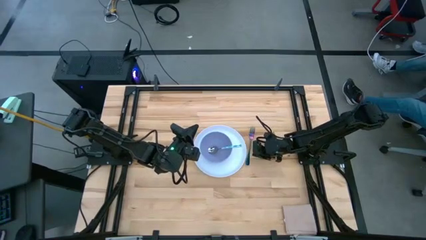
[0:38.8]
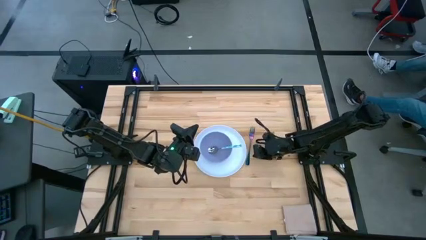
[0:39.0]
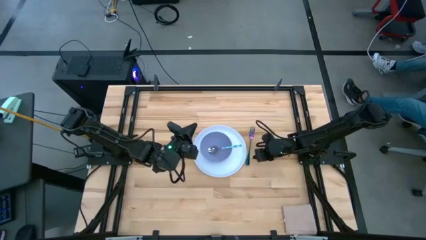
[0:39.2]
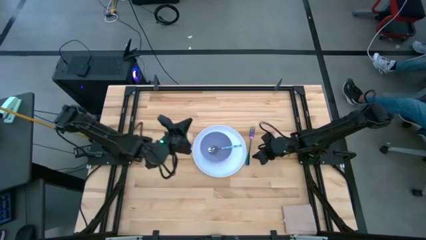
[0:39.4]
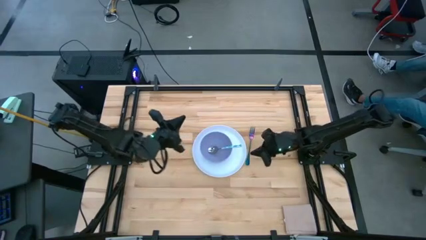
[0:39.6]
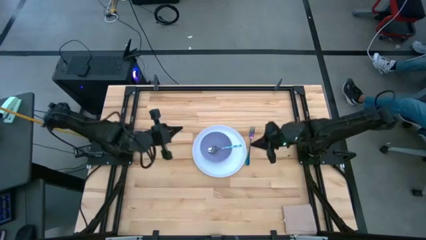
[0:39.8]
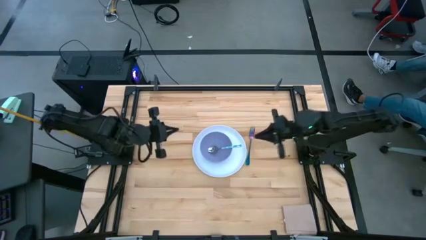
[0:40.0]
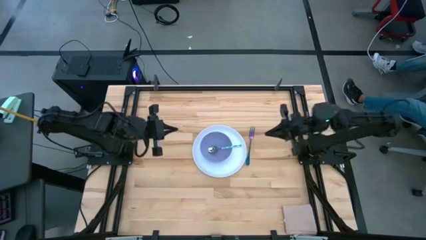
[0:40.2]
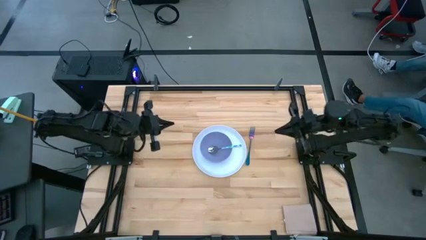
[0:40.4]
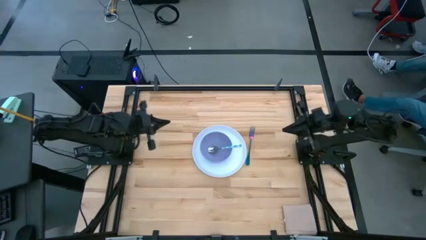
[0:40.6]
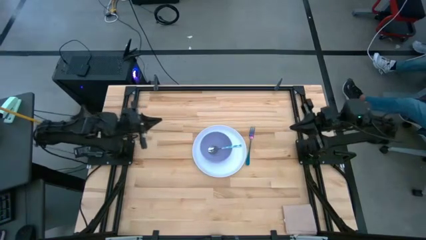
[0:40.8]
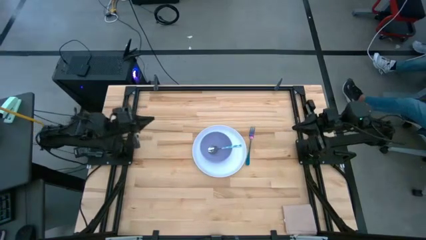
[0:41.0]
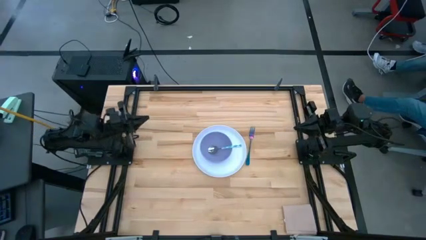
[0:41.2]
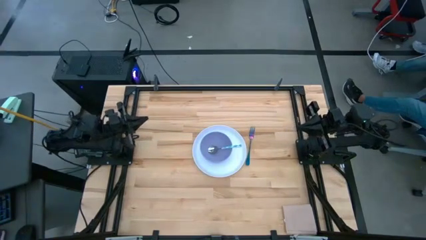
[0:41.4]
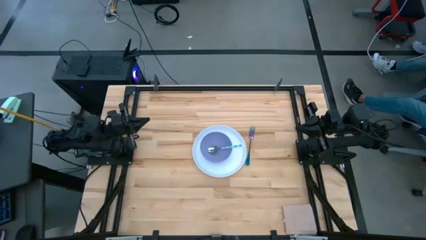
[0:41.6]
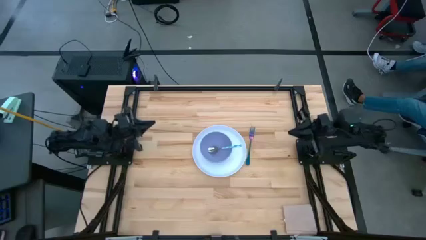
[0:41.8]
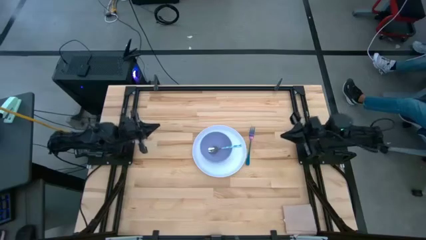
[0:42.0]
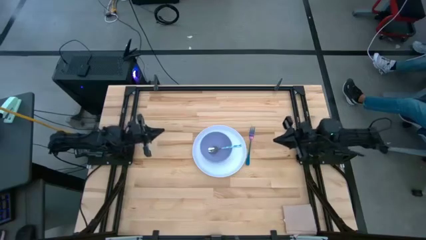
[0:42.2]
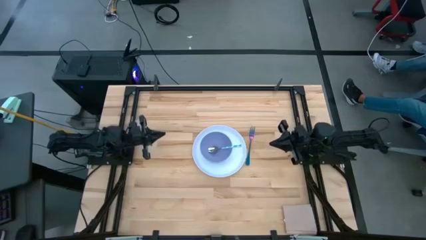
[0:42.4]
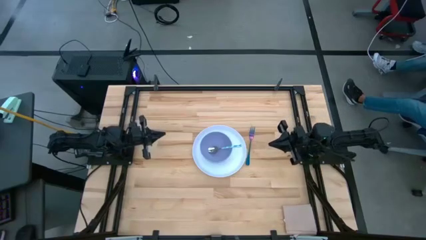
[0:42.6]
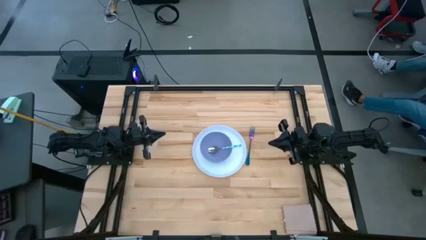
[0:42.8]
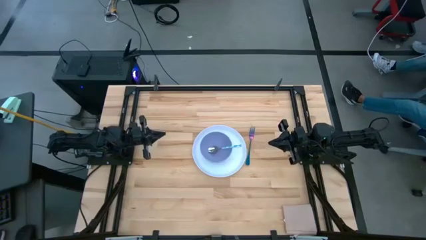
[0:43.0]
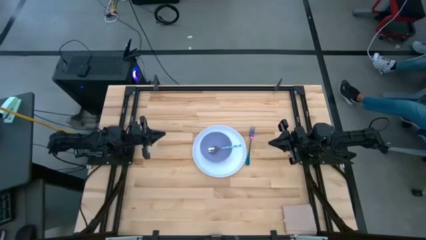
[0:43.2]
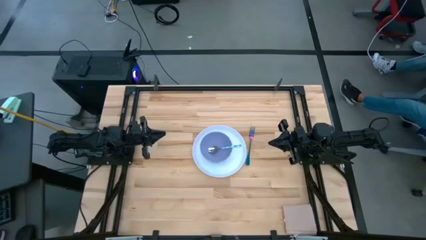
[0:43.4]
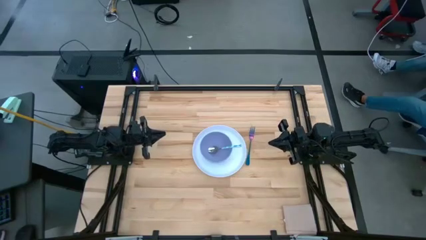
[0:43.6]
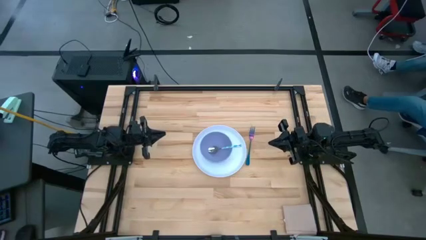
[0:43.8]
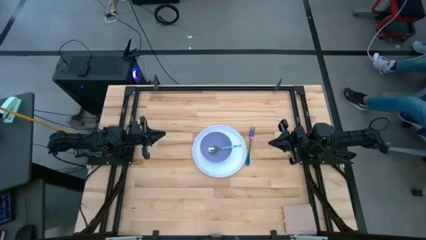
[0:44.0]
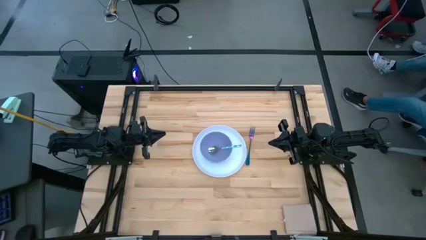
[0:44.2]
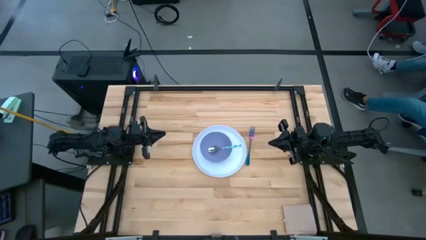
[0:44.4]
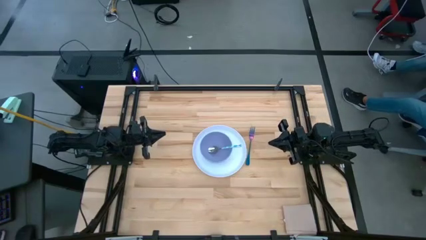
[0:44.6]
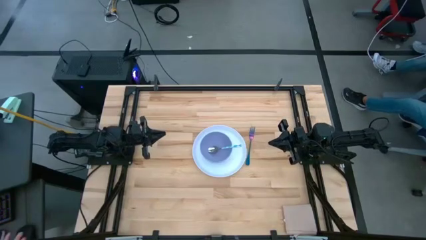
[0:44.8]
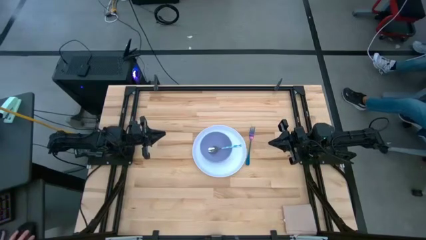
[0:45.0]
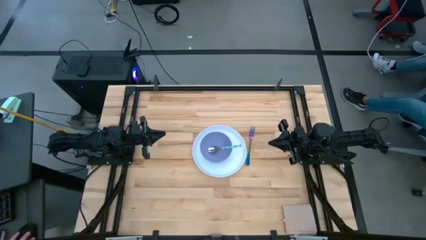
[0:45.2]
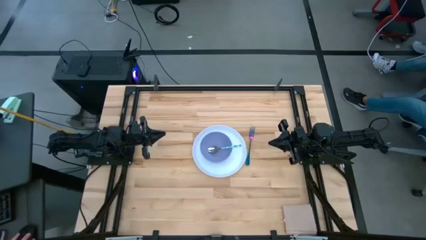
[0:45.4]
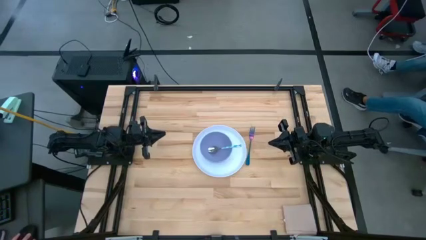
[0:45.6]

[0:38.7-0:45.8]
Task: Set table place
Return to Home Position

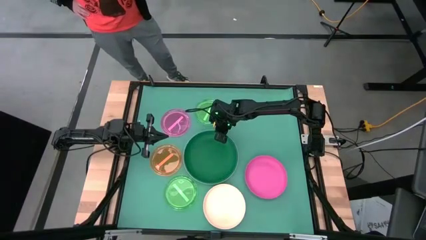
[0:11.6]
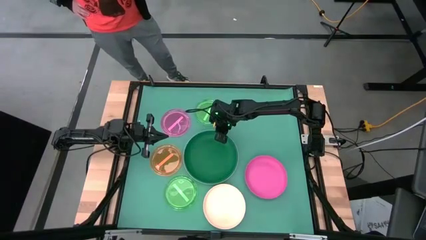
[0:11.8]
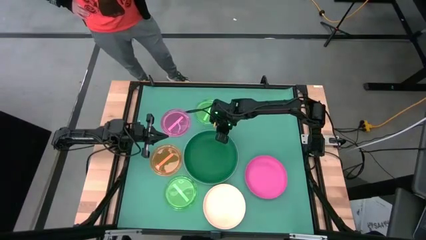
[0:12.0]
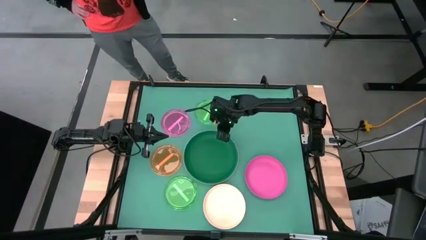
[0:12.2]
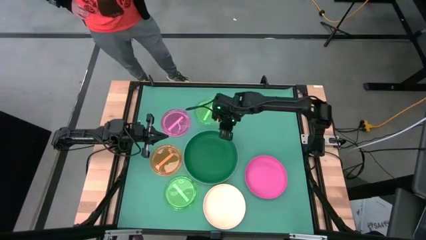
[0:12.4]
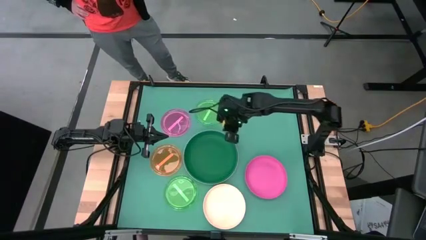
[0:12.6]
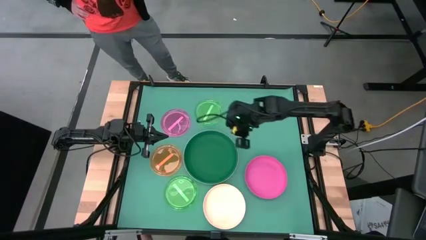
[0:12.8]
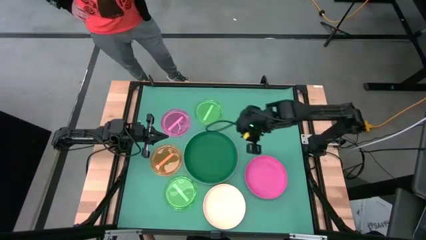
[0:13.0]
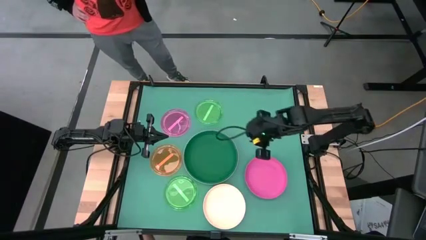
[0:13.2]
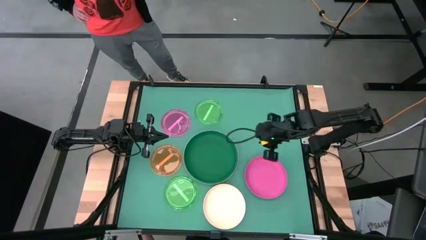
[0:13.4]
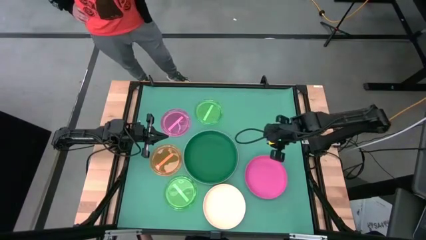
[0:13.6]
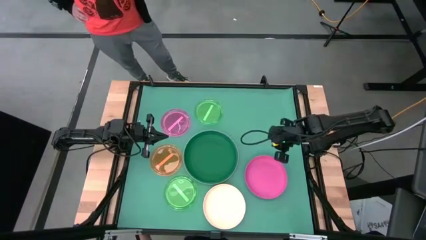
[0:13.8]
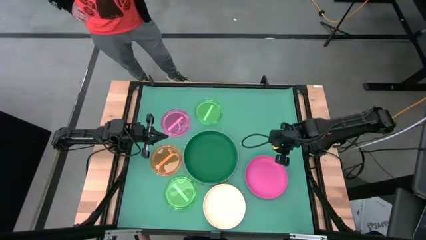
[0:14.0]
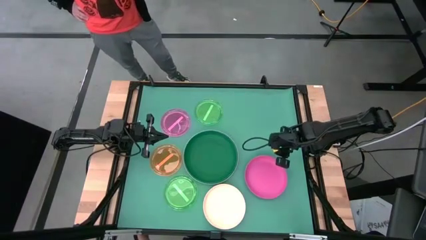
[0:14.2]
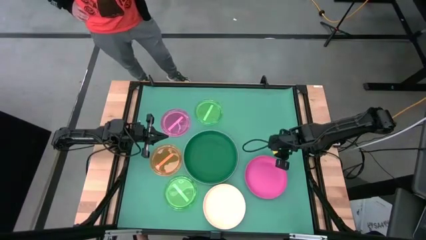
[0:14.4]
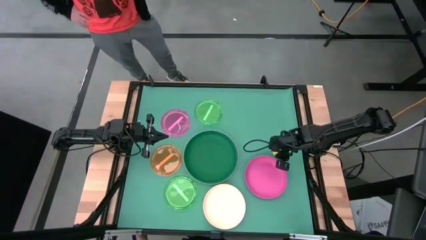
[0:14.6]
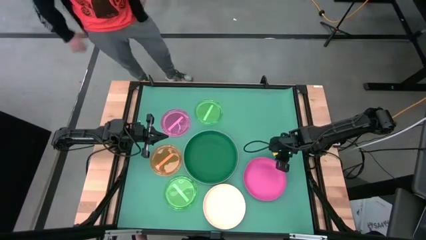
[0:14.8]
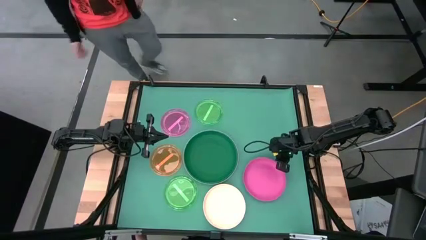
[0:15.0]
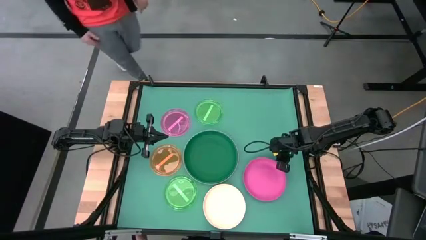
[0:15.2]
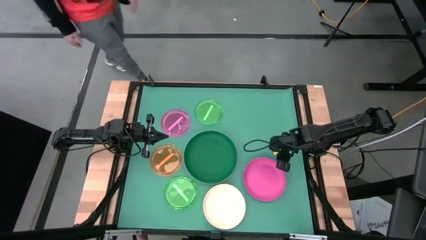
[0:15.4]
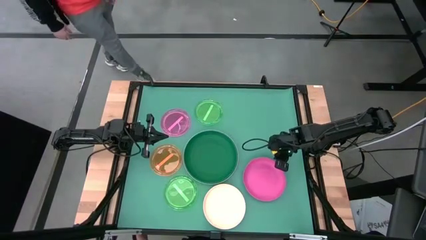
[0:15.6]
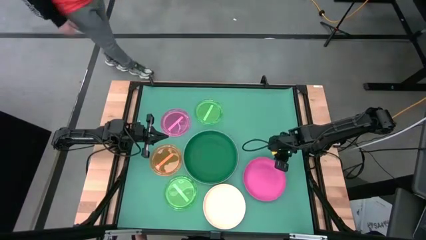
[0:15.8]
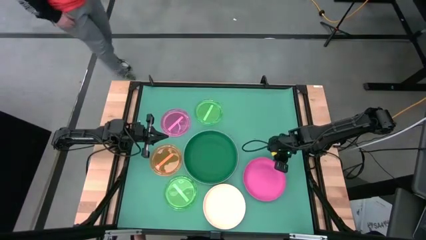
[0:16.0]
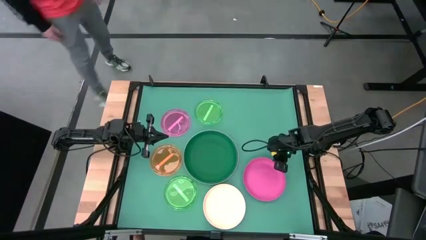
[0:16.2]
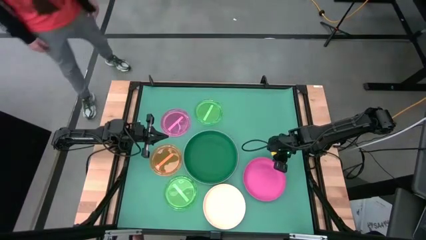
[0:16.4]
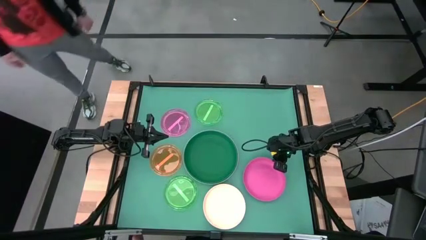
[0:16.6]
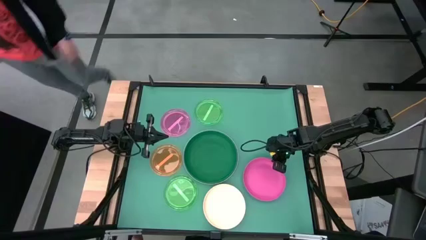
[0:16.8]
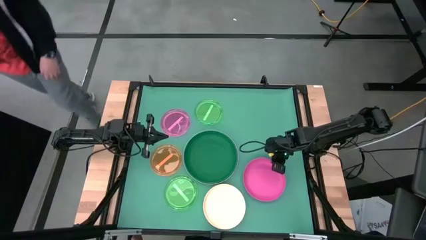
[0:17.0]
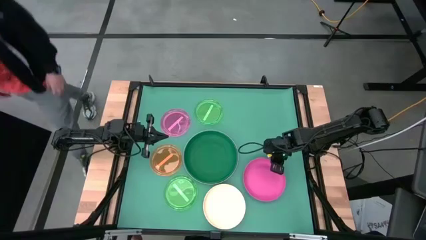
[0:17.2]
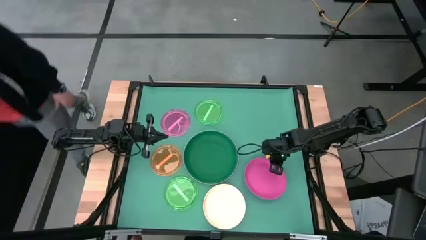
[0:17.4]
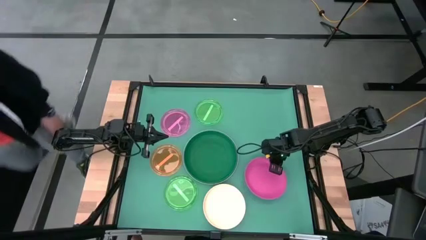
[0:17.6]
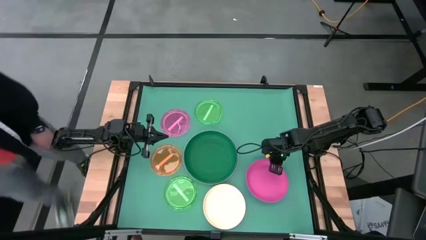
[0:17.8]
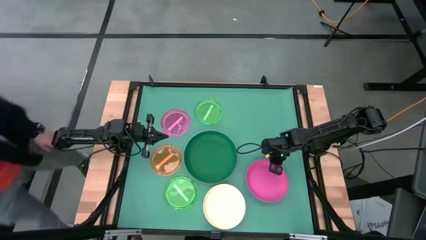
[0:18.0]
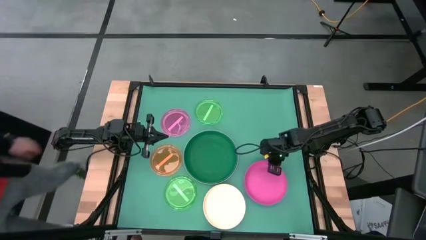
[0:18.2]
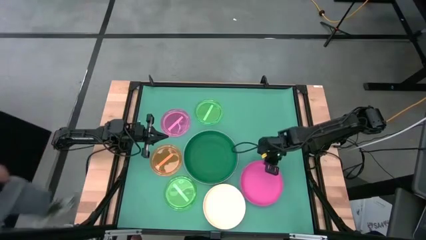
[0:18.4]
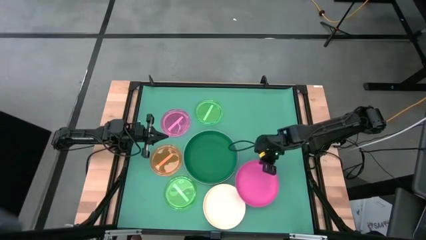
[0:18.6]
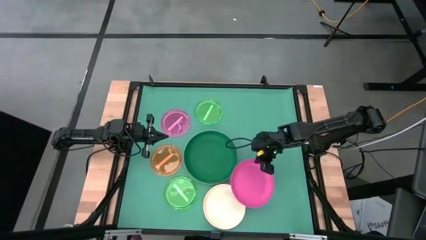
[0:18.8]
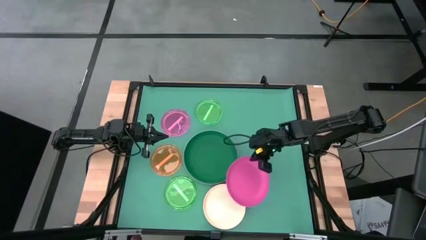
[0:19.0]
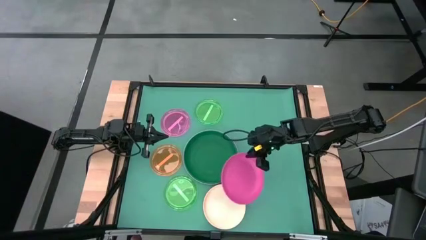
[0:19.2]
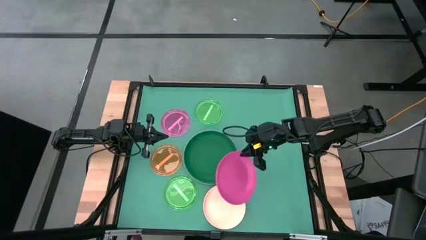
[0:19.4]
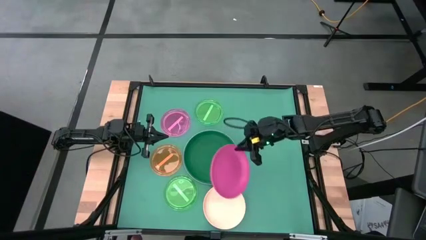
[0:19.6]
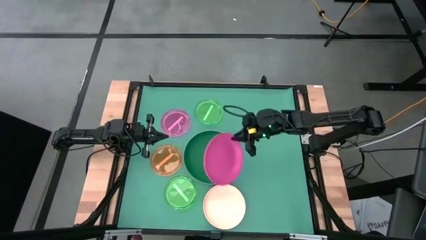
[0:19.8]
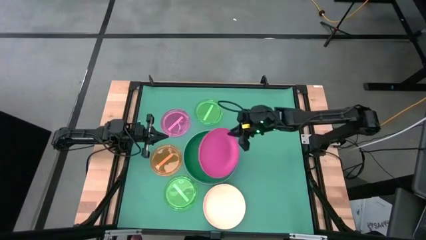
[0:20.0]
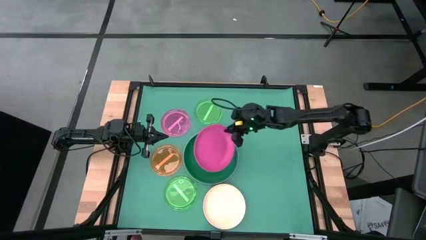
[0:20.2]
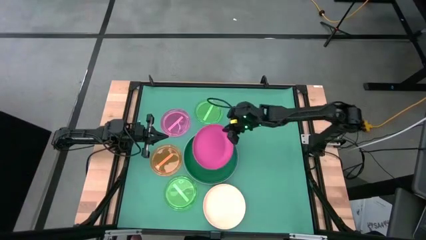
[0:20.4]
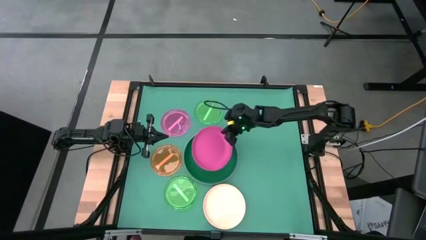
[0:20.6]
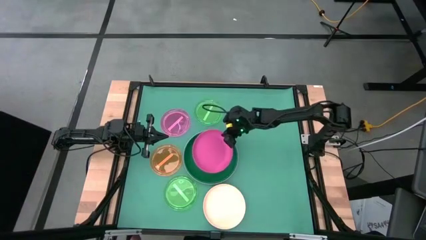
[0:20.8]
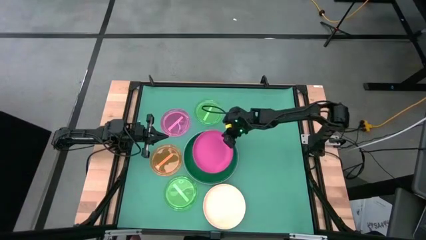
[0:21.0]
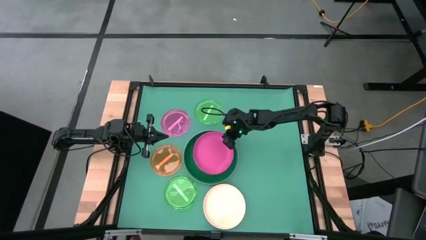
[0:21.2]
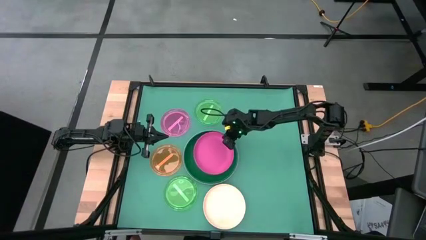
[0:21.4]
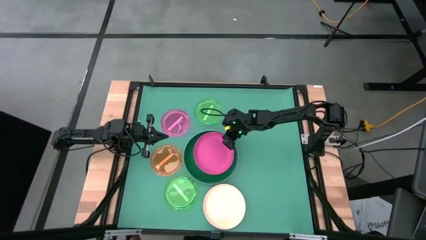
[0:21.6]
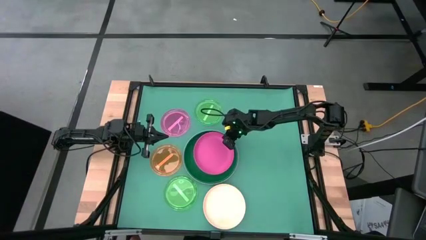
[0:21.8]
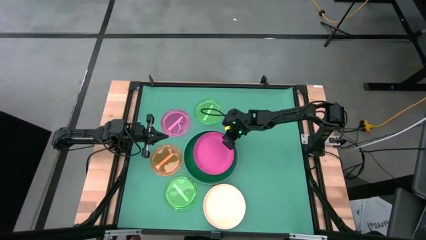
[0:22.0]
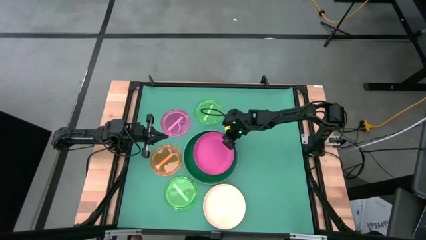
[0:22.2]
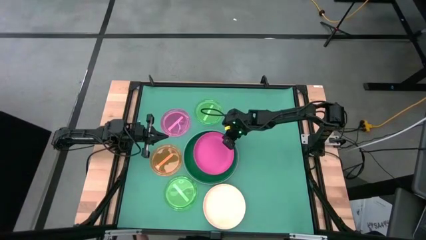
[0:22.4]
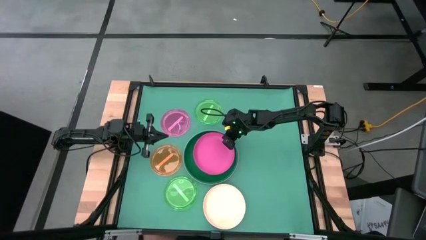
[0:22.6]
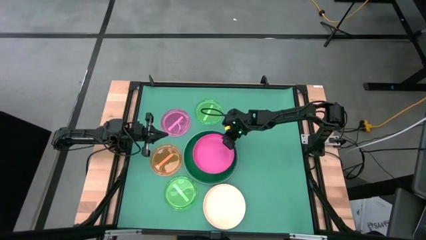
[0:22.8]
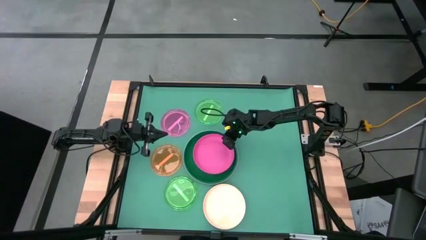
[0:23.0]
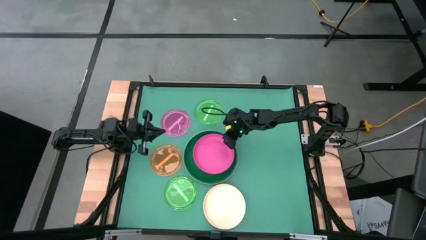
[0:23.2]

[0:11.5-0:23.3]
Task: Stack plastic plates
Stack the pink plate on top of the green plate
